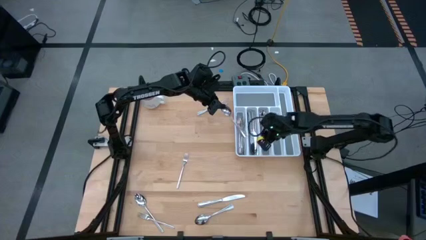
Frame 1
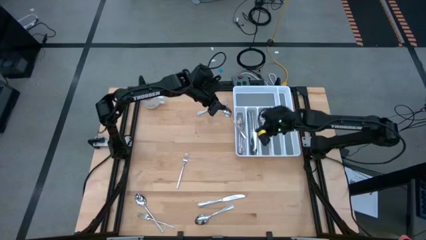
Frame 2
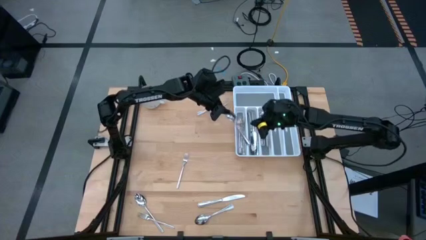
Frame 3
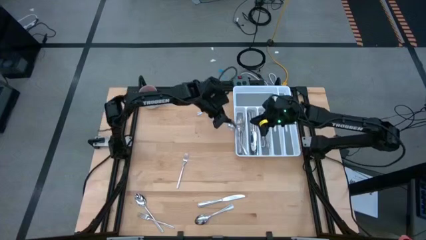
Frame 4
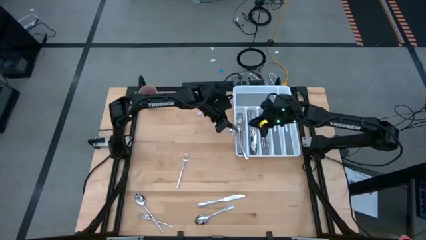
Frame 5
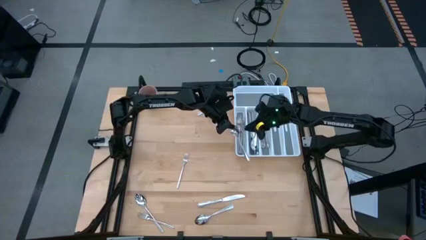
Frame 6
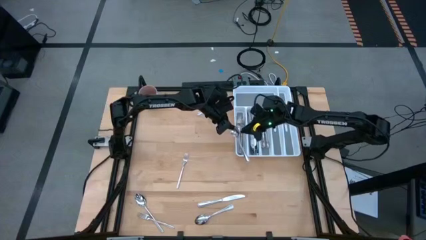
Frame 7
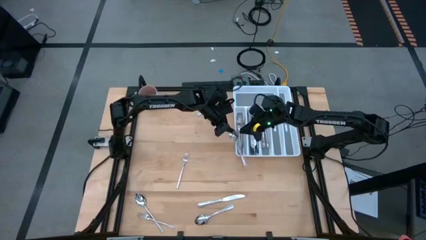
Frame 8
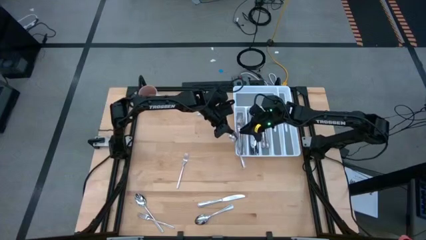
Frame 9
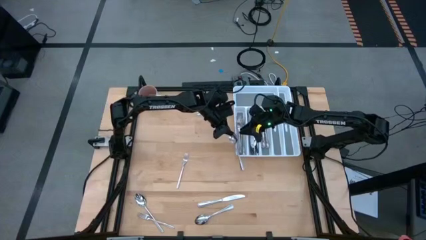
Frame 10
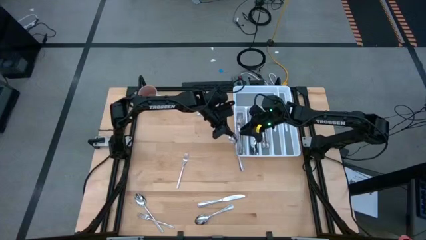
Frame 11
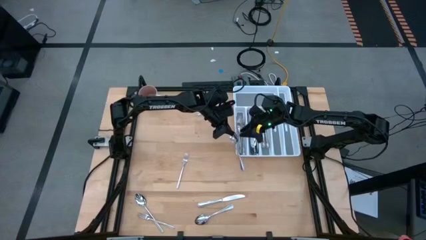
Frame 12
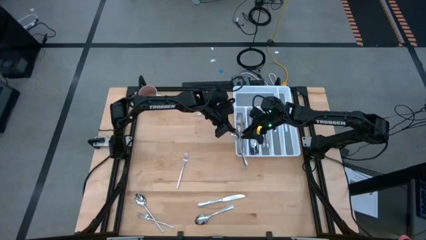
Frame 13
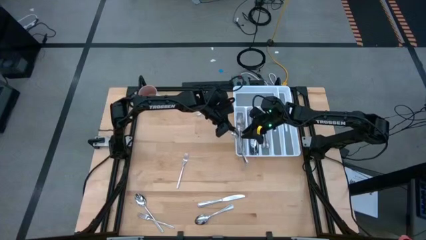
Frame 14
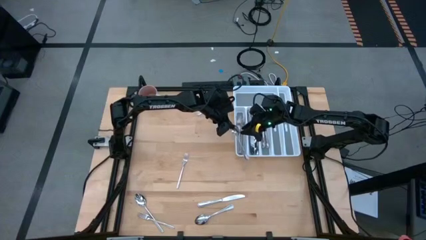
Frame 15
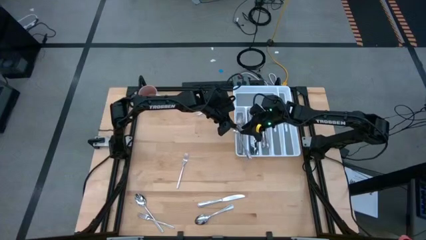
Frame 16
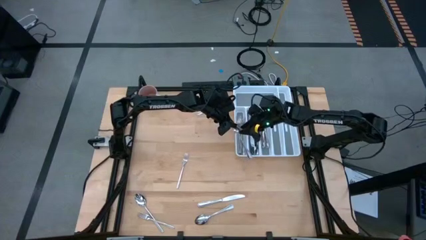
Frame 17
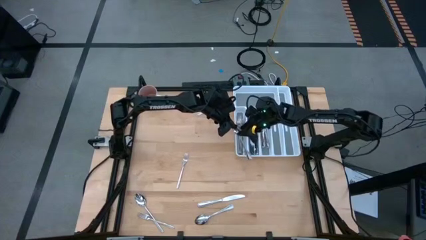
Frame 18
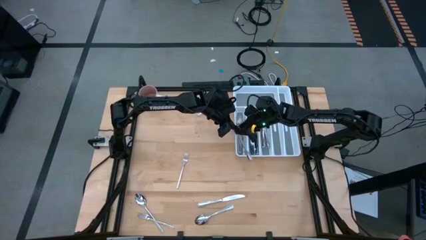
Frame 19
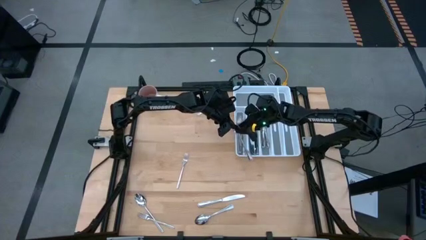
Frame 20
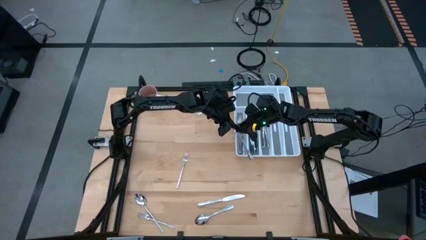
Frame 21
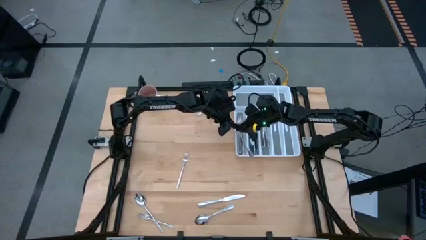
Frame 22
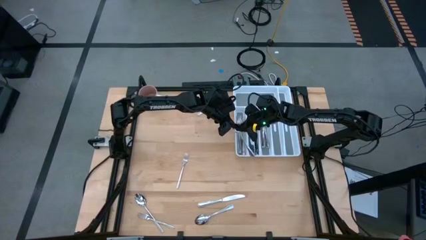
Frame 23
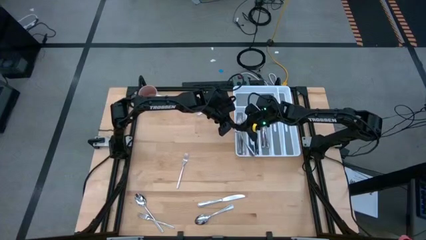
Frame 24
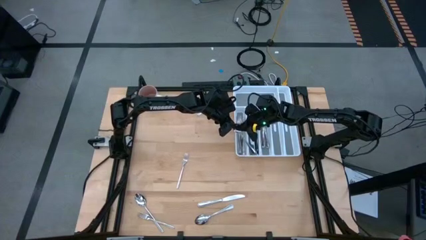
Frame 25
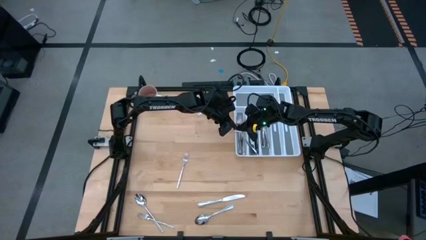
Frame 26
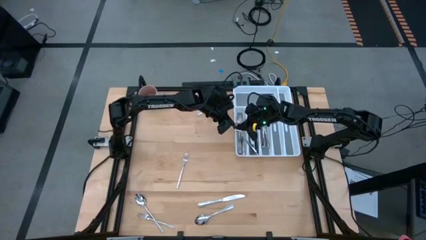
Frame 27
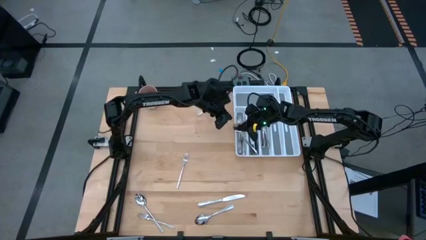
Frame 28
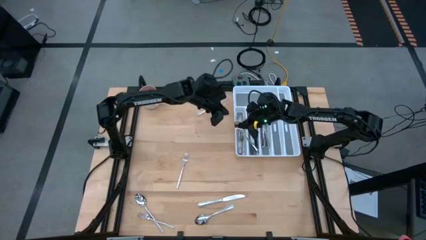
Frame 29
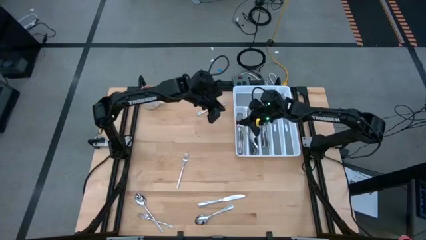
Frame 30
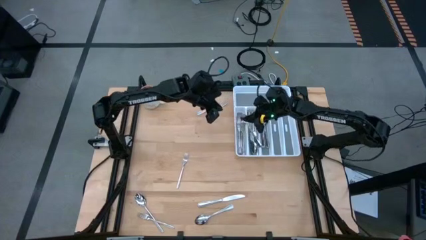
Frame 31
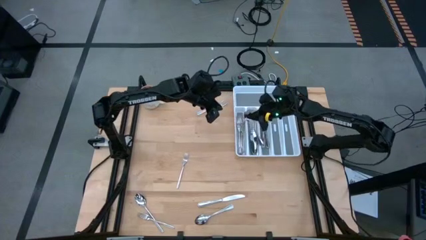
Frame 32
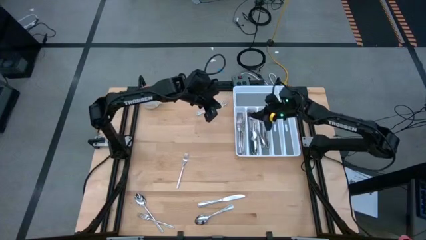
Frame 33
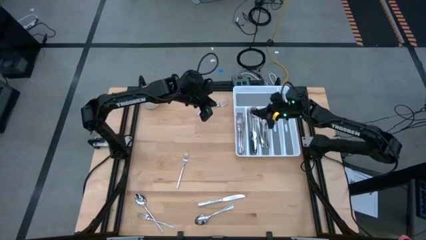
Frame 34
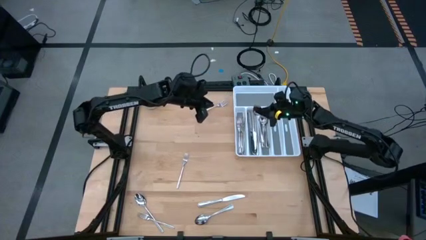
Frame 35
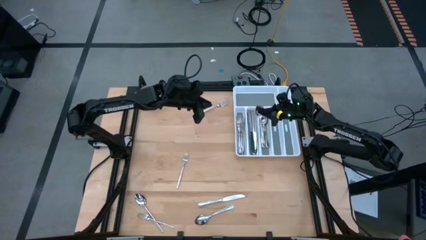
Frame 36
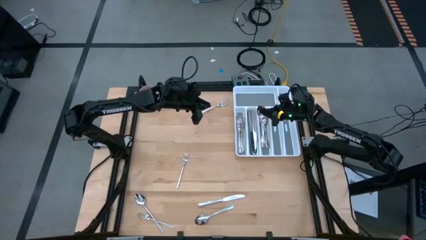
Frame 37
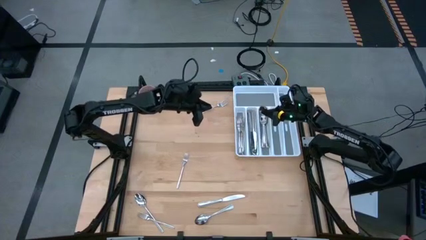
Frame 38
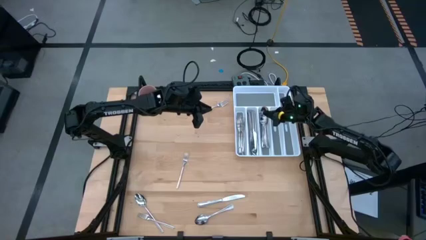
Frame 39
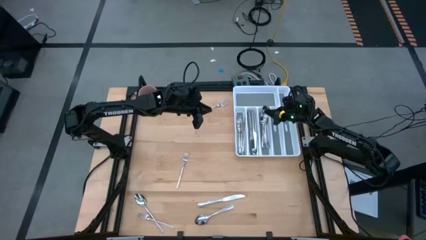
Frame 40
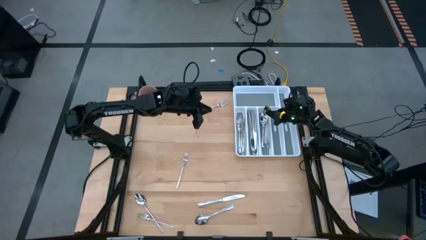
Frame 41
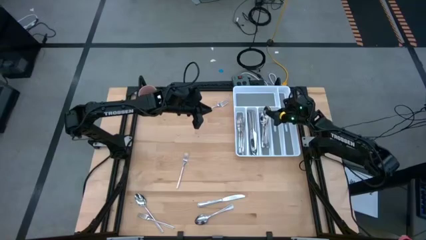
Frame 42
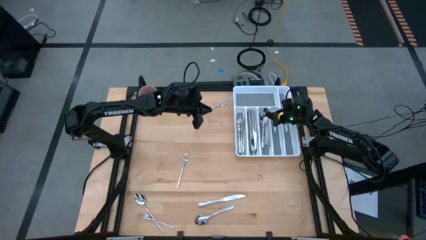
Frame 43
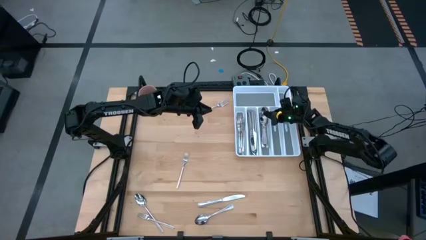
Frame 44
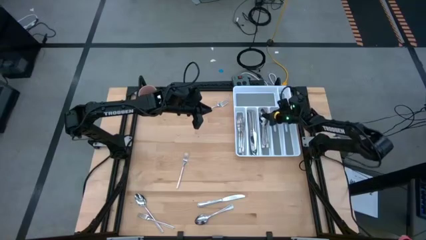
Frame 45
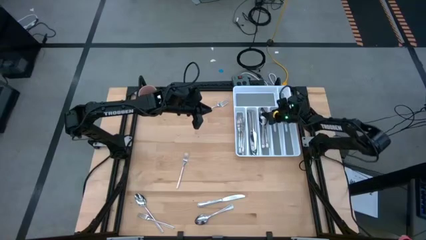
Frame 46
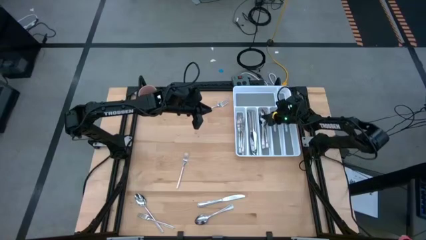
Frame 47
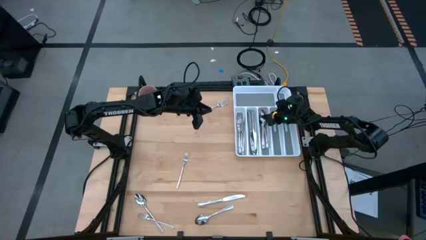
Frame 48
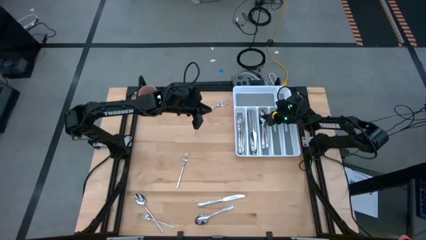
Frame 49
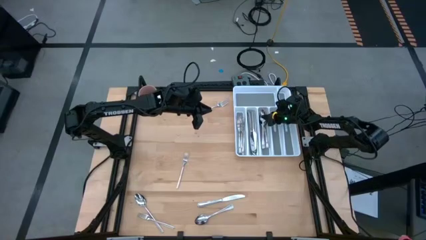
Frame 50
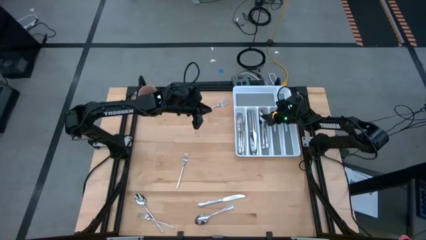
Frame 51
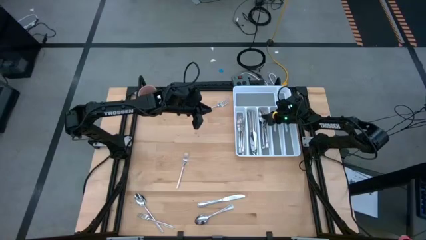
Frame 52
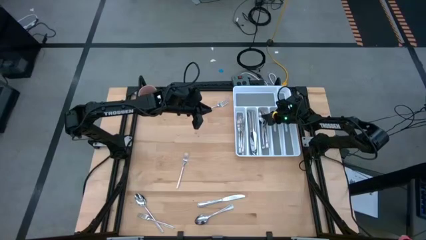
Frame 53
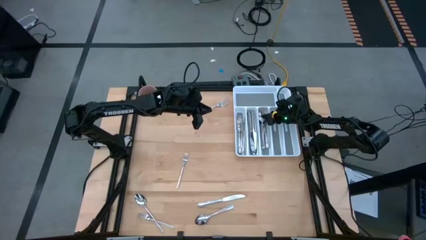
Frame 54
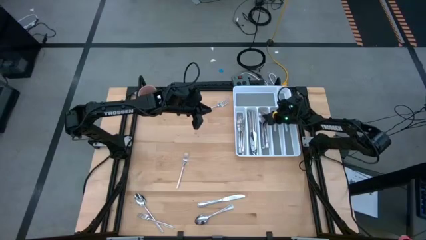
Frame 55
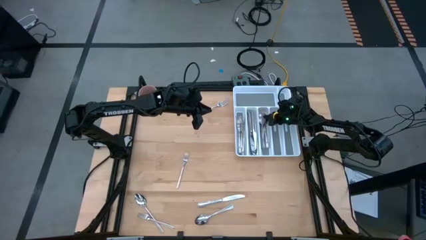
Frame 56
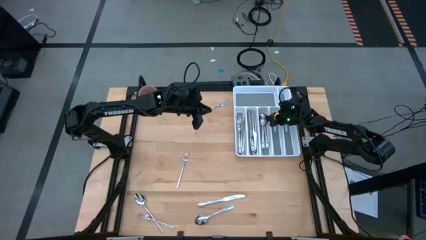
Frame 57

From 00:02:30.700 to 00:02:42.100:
Task: Sort silverware
Put the silver spoon into the middle right slot of the white silverware tray
